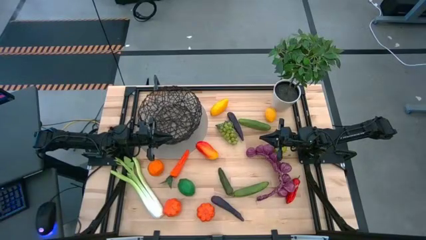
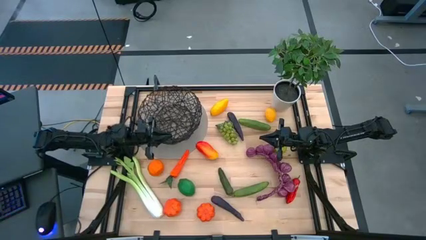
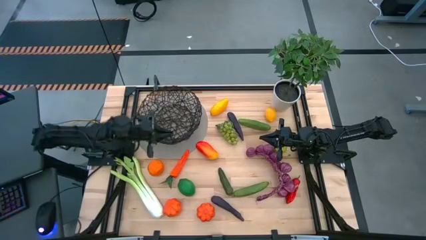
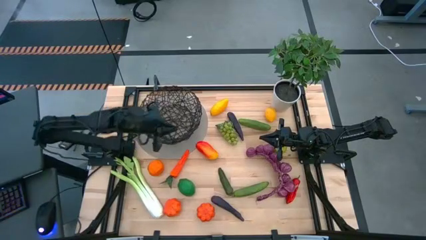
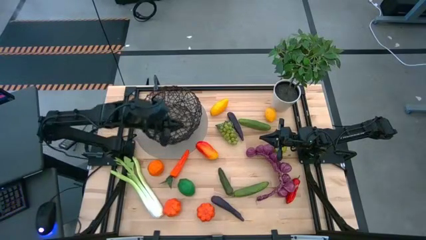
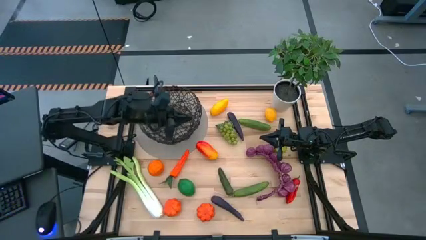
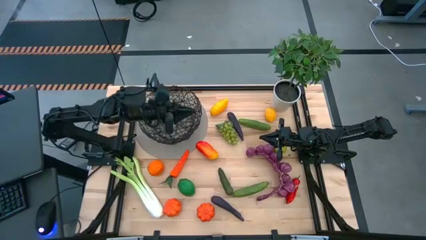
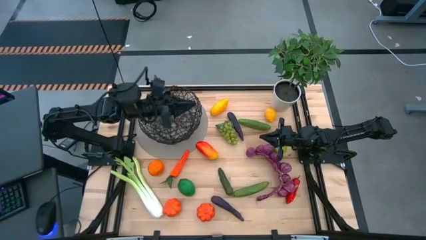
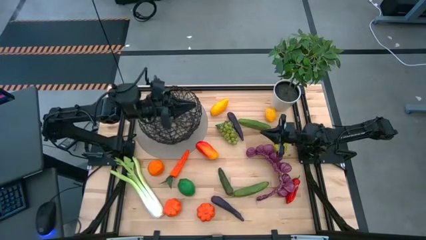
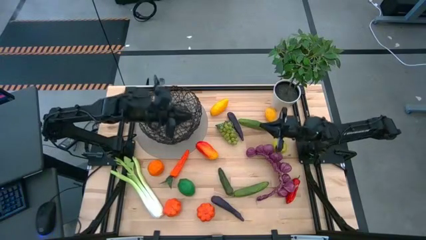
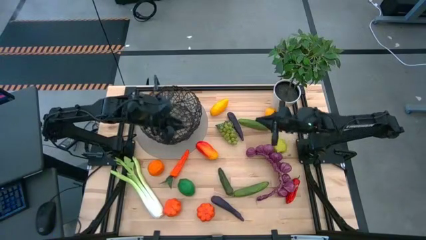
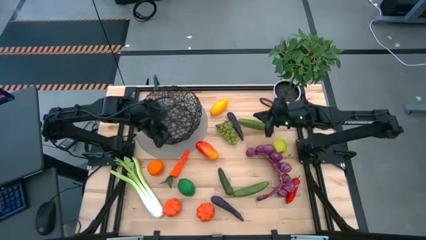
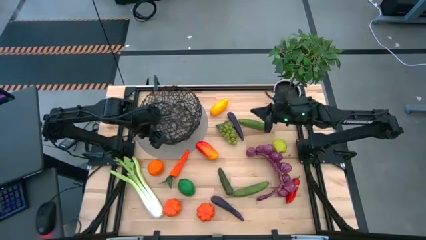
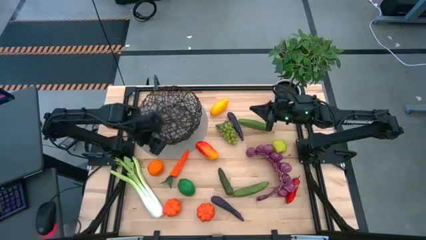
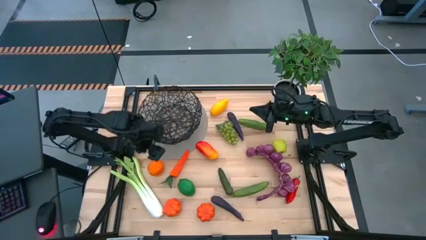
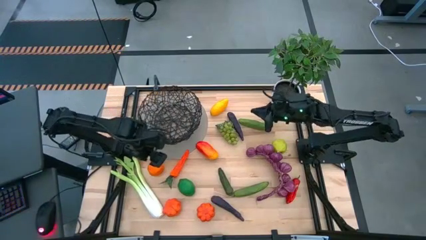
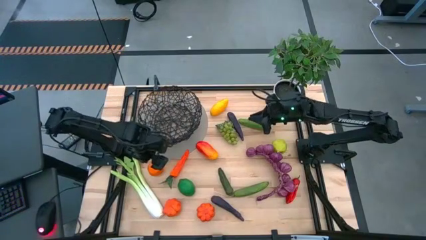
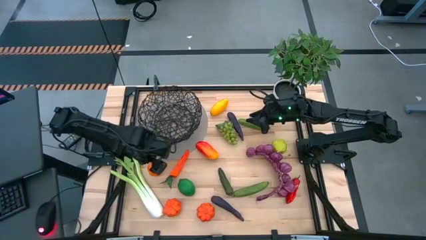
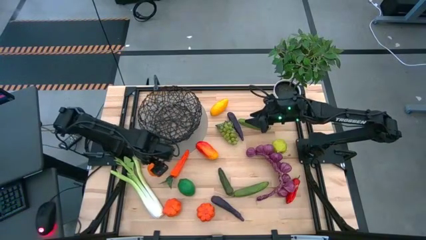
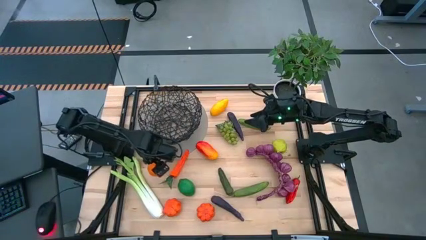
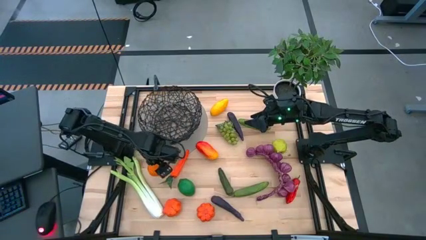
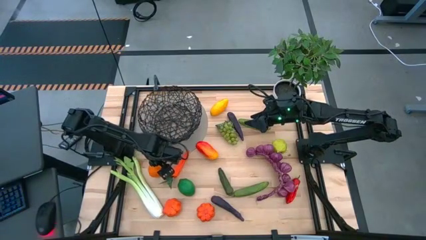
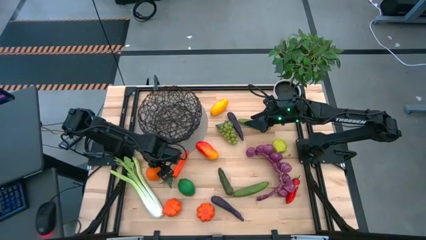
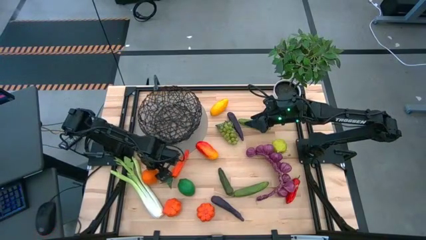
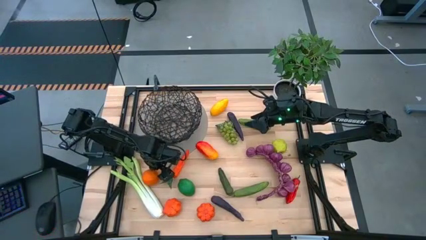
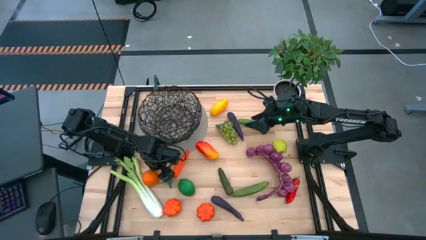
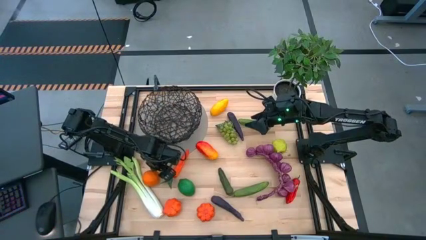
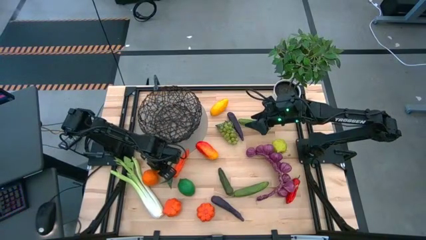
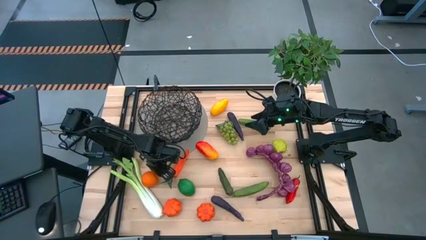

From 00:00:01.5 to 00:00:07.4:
Task: Build produce basket
Put the orange into the black wire basket

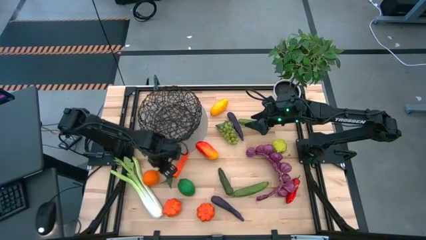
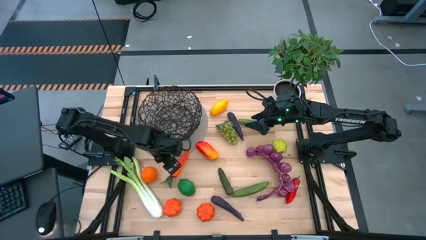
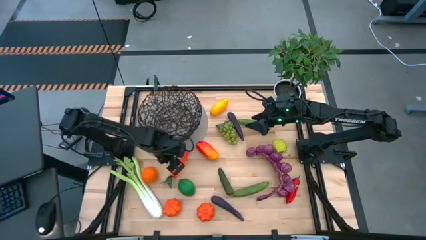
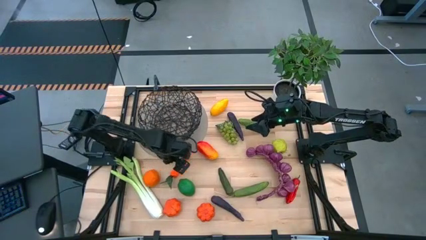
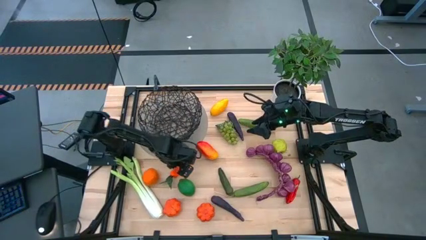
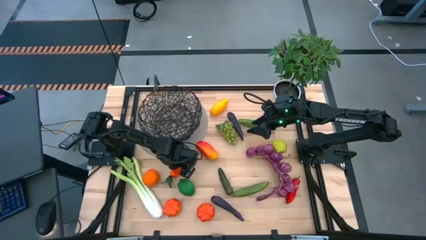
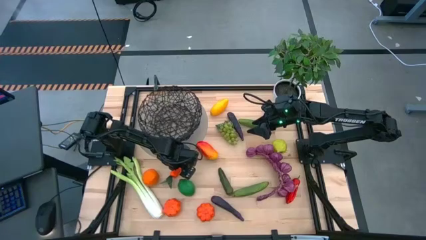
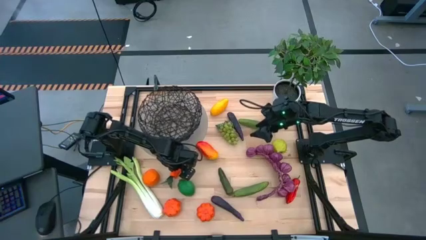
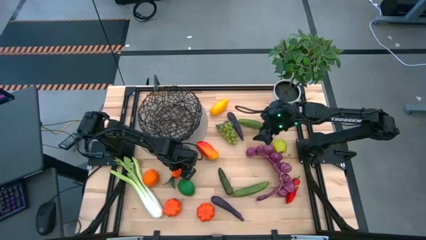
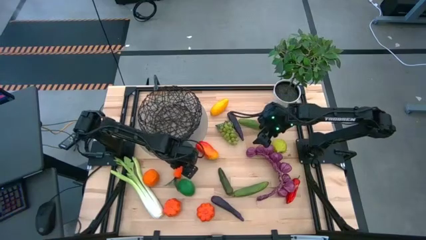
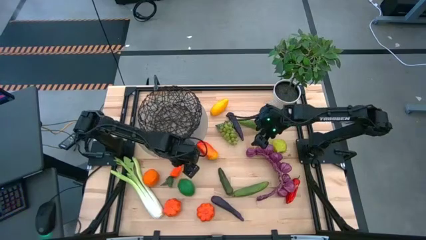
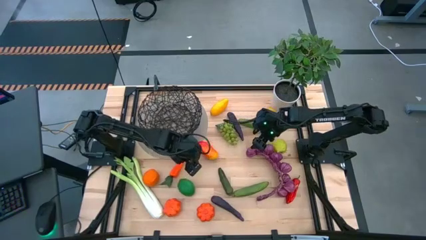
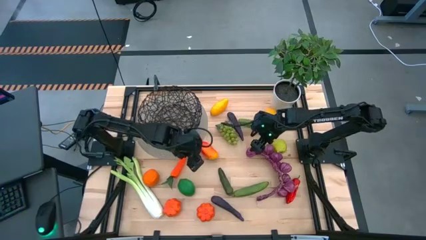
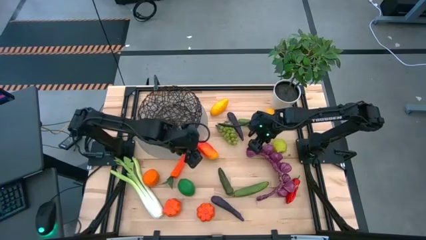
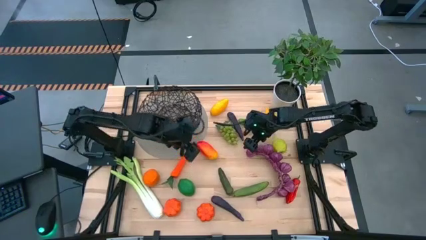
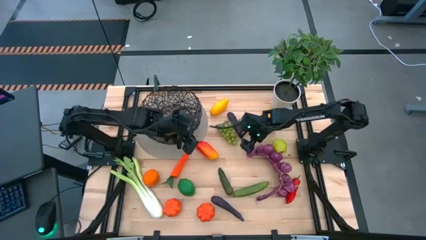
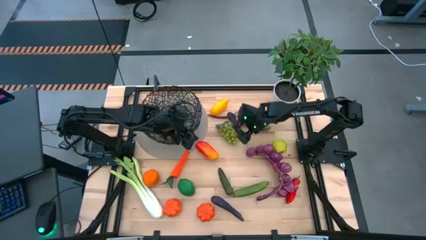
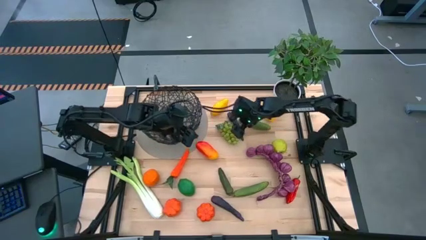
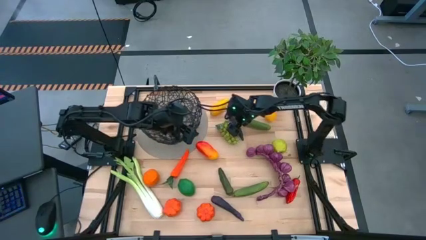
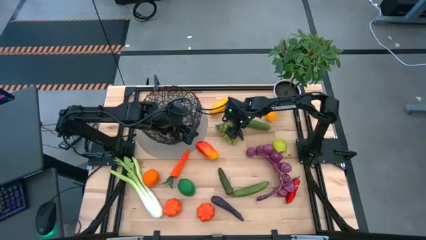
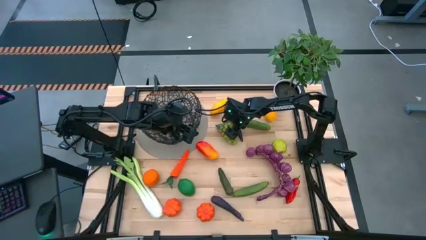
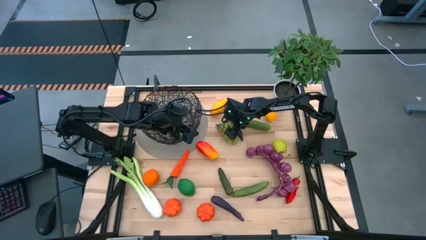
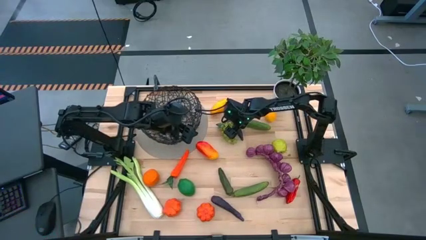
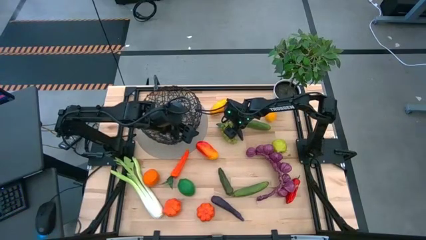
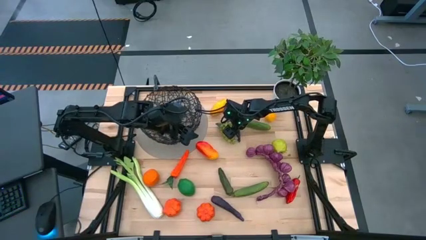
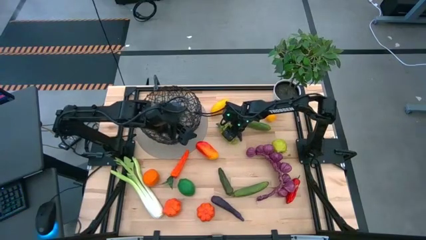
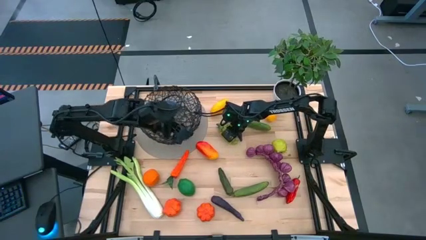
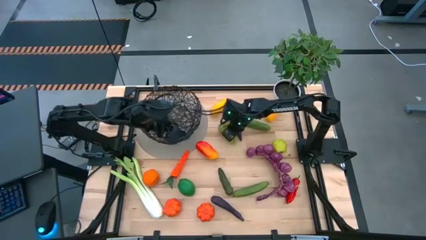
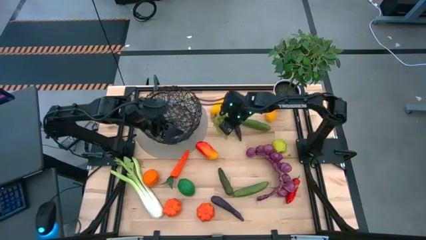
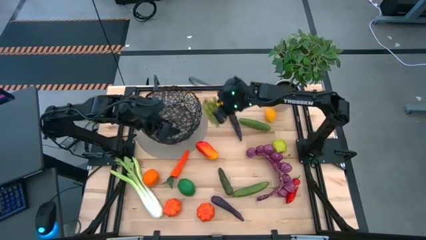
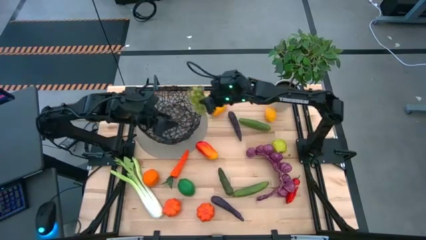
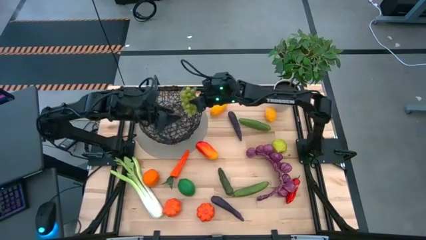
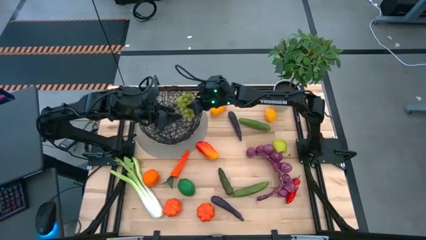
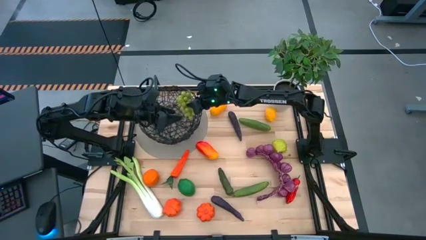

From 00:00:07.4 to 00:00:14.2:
Put the green grapes into the black wire basket

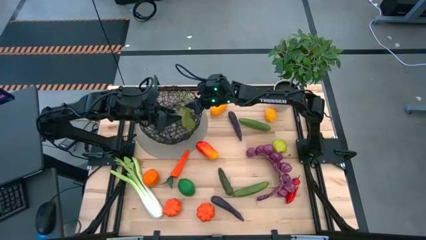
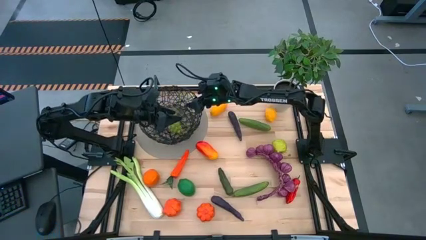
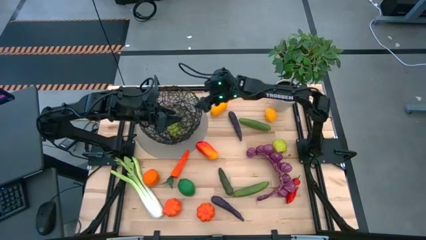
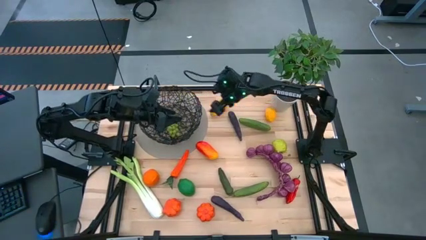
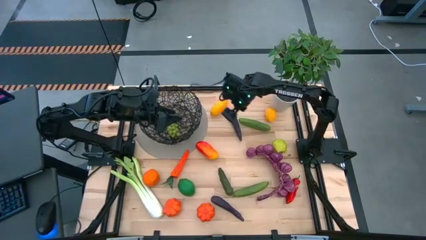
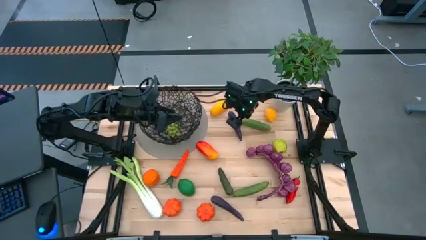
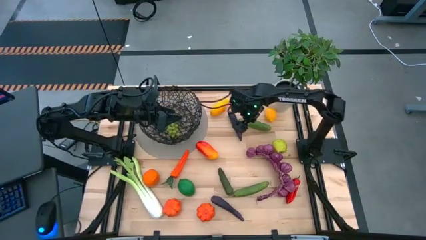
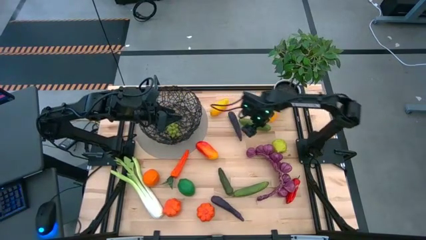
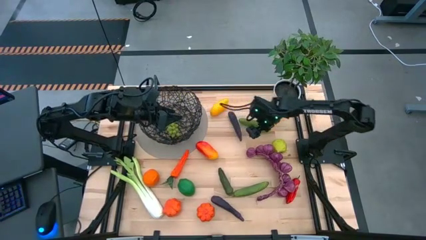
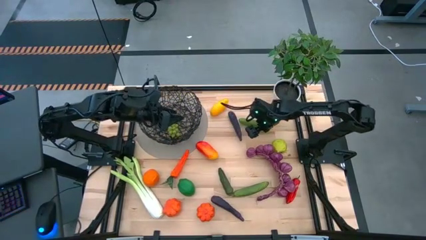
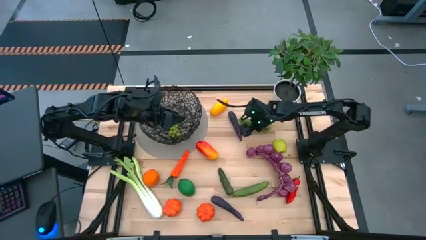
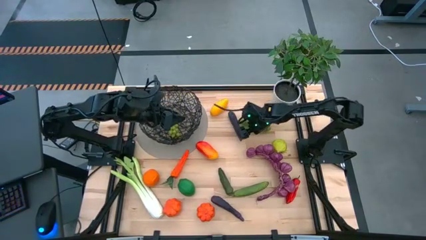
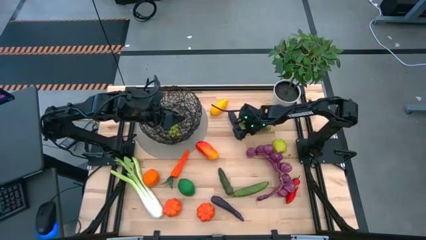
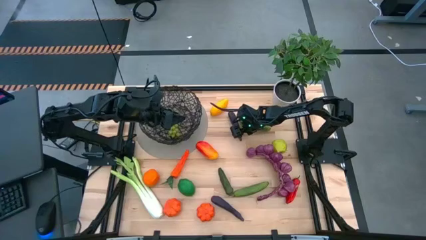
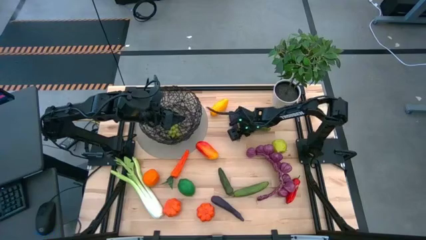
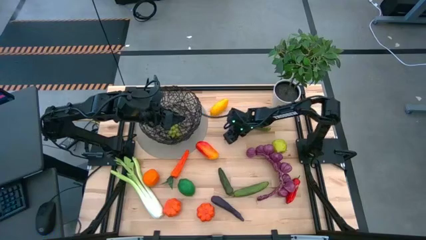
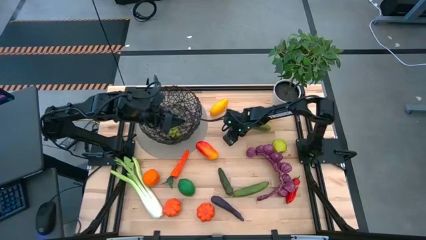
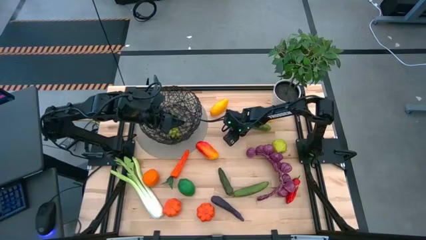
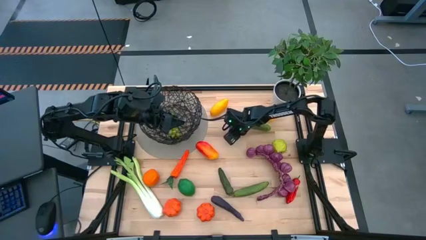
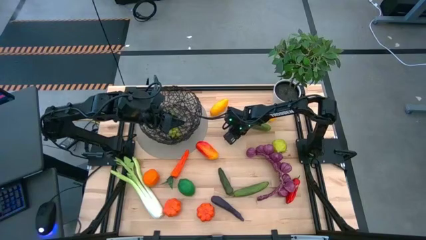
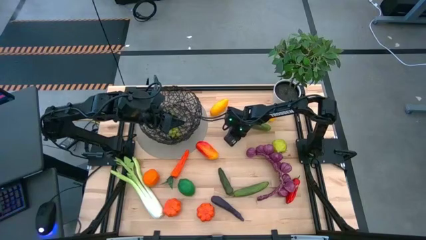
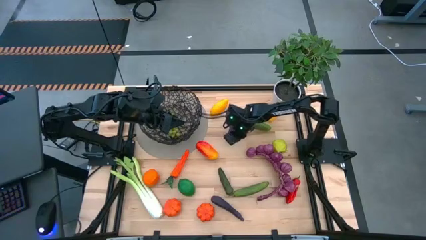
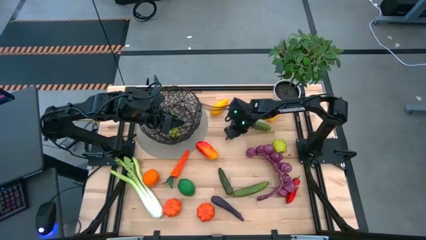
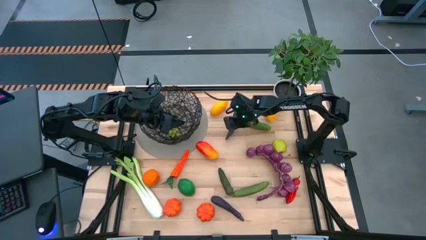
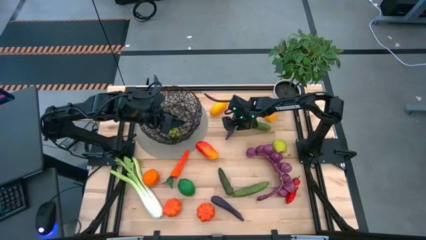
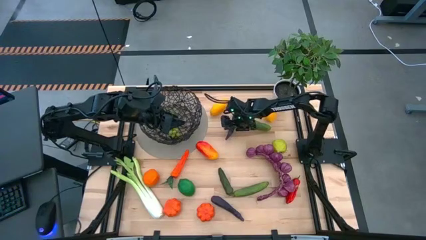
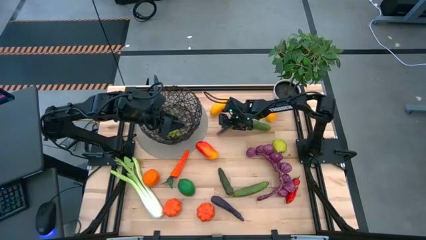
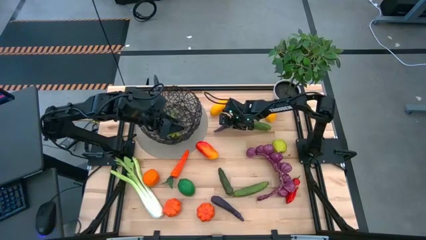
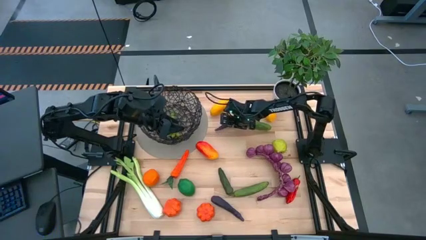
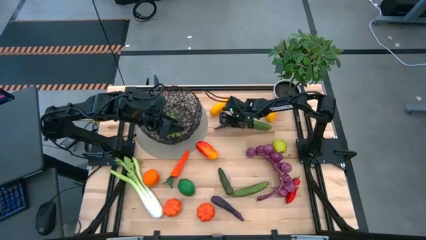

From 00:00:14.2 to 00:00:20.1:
Put the top purple eggplant into the black wire basket
